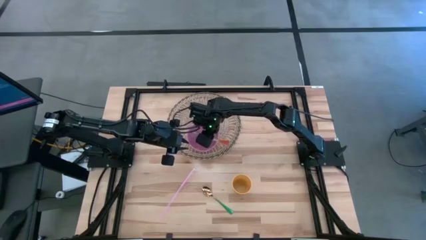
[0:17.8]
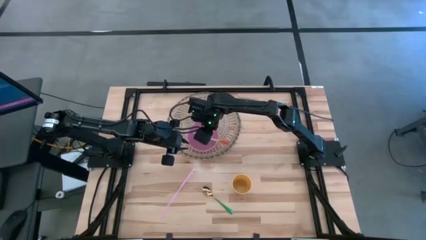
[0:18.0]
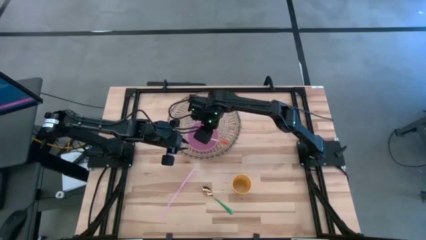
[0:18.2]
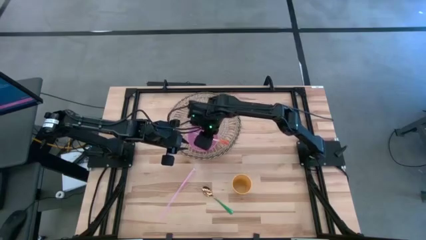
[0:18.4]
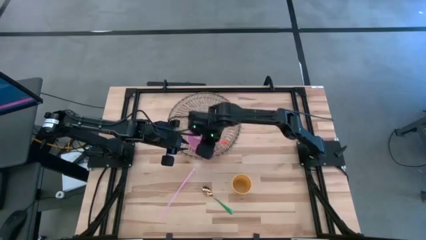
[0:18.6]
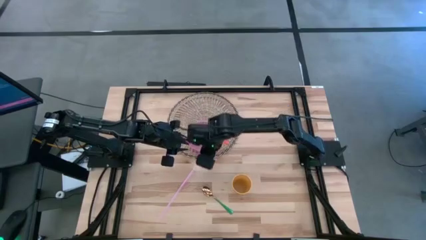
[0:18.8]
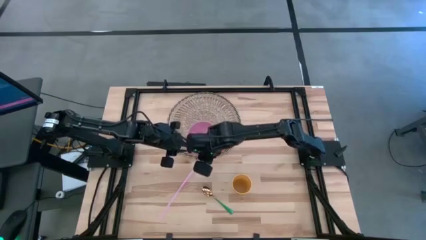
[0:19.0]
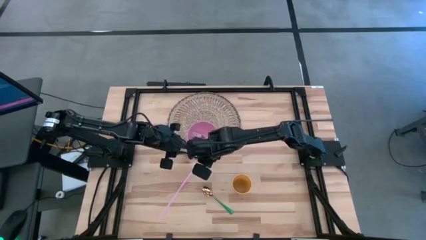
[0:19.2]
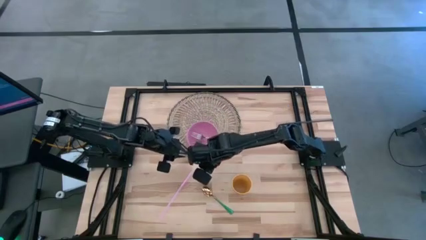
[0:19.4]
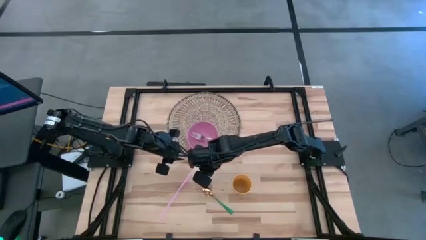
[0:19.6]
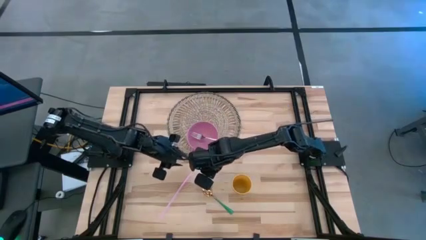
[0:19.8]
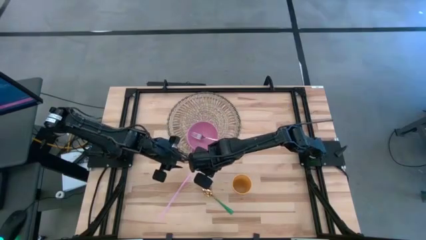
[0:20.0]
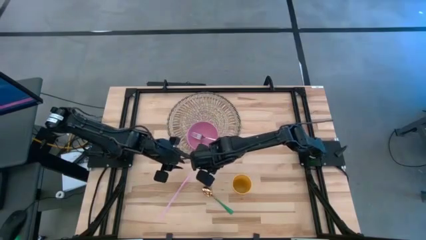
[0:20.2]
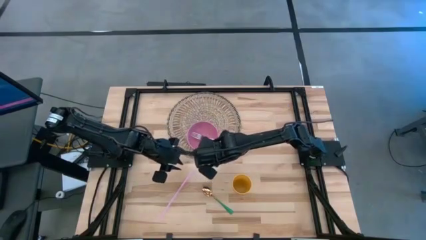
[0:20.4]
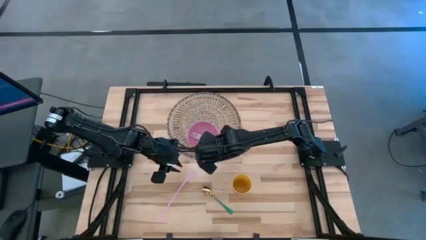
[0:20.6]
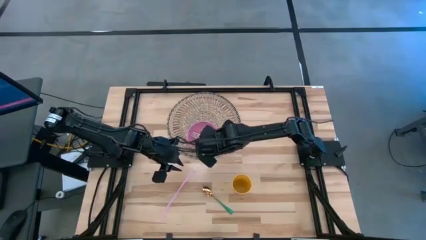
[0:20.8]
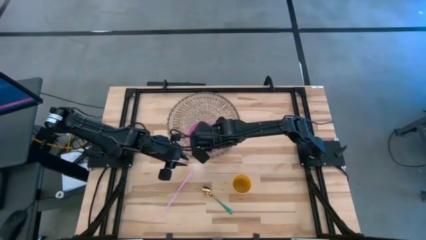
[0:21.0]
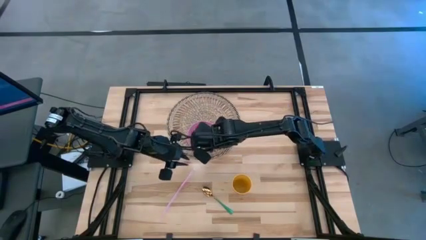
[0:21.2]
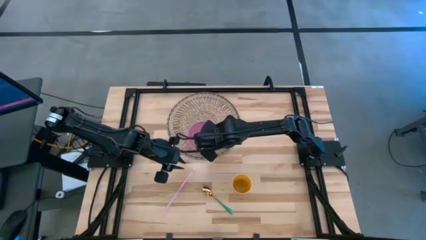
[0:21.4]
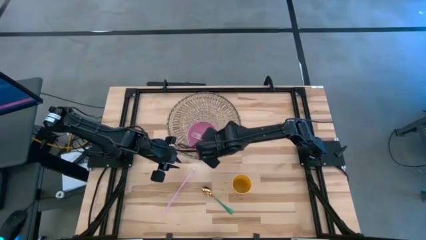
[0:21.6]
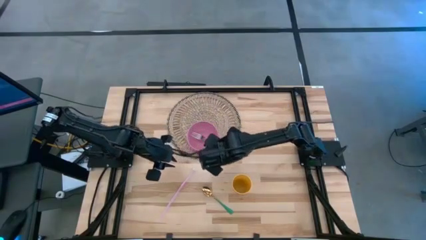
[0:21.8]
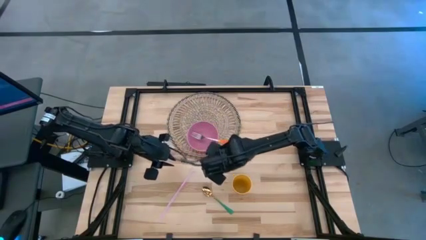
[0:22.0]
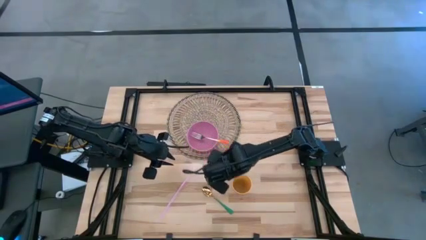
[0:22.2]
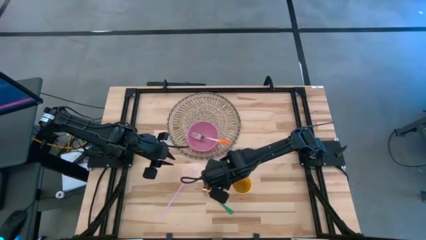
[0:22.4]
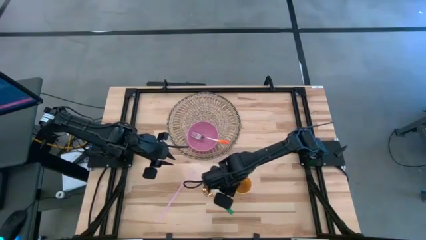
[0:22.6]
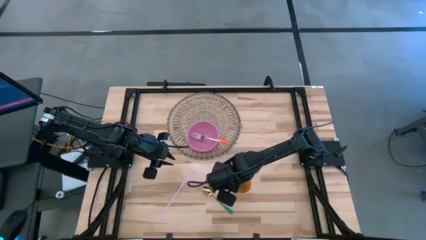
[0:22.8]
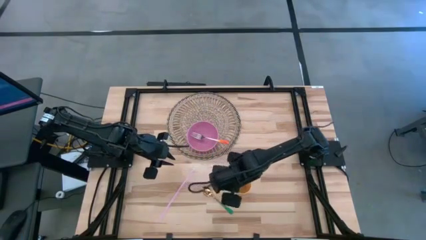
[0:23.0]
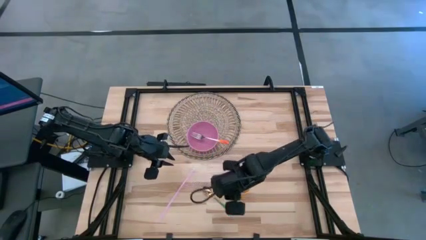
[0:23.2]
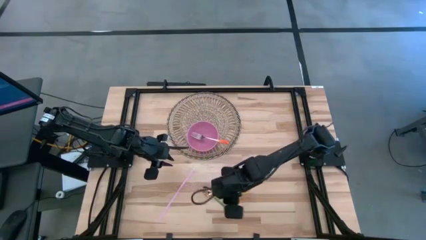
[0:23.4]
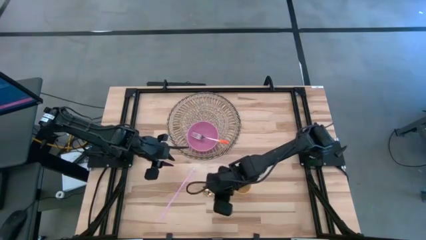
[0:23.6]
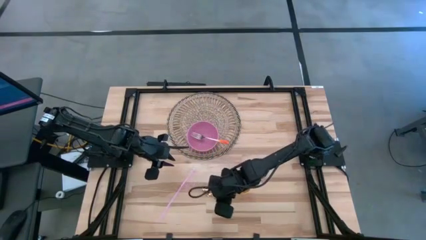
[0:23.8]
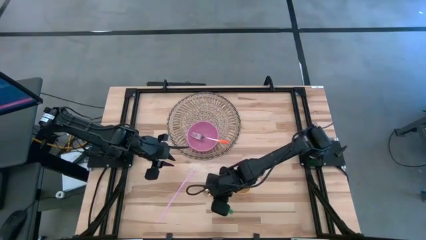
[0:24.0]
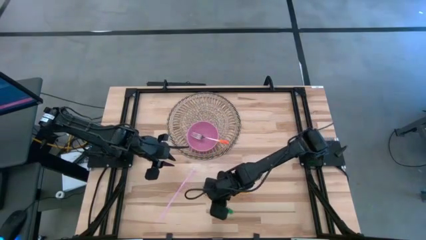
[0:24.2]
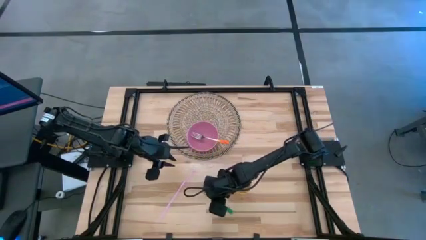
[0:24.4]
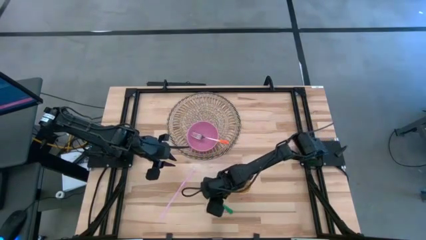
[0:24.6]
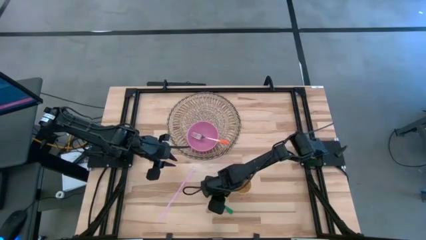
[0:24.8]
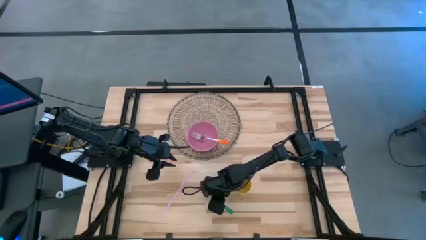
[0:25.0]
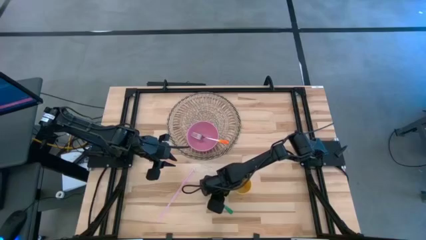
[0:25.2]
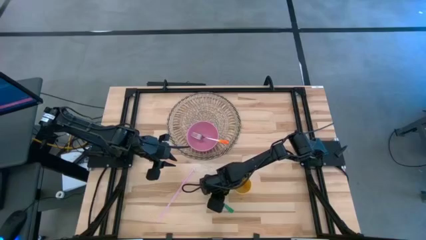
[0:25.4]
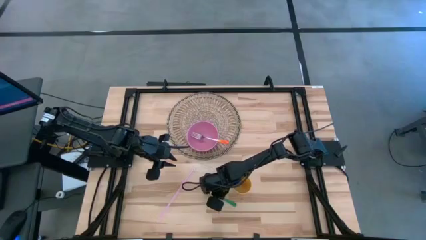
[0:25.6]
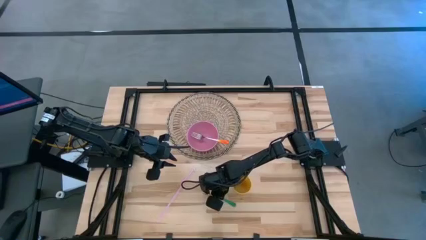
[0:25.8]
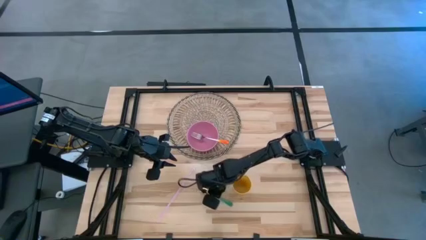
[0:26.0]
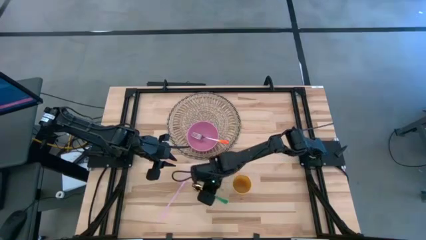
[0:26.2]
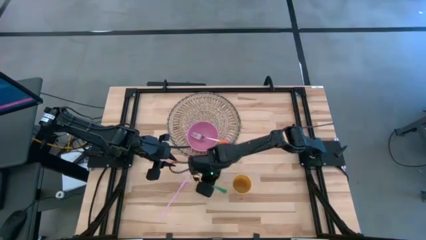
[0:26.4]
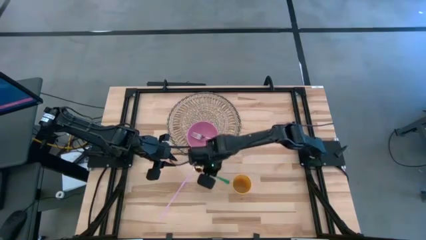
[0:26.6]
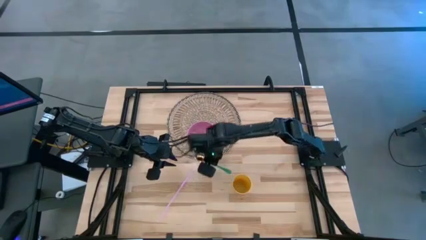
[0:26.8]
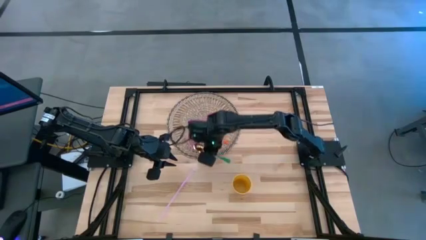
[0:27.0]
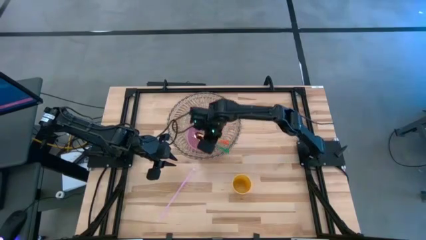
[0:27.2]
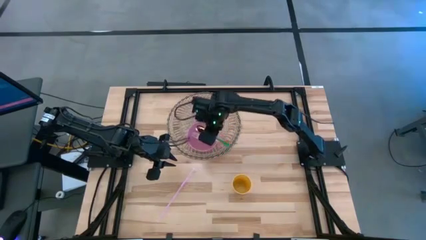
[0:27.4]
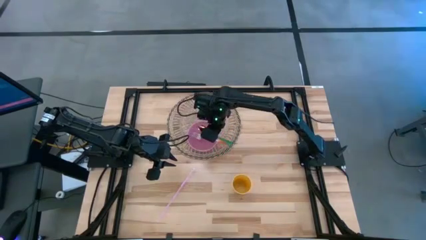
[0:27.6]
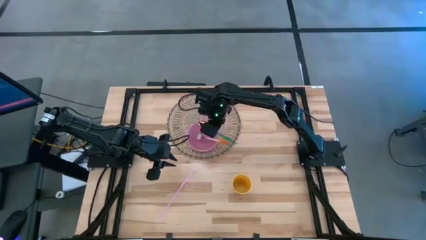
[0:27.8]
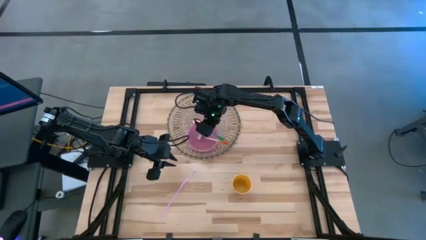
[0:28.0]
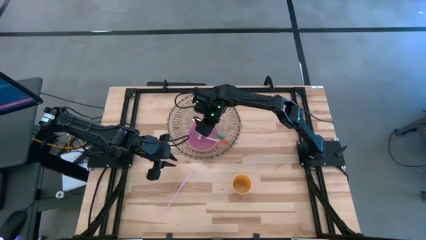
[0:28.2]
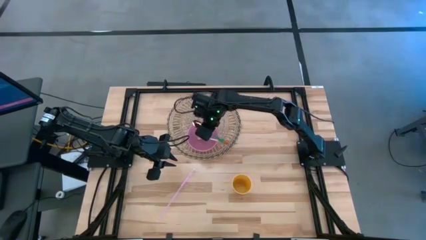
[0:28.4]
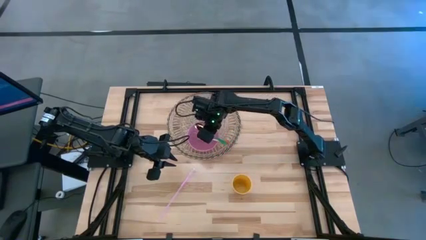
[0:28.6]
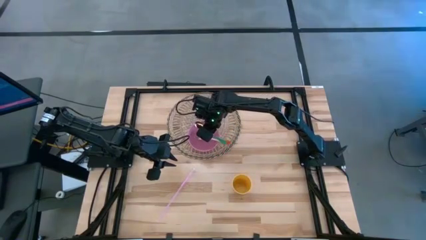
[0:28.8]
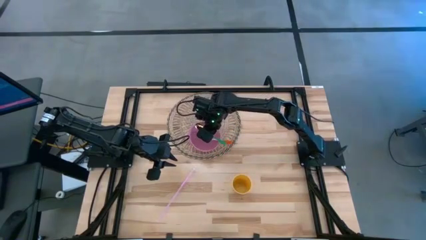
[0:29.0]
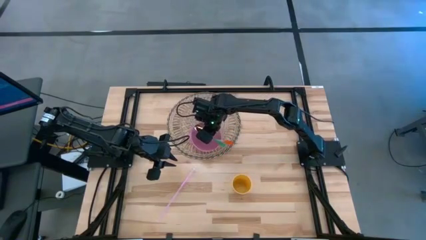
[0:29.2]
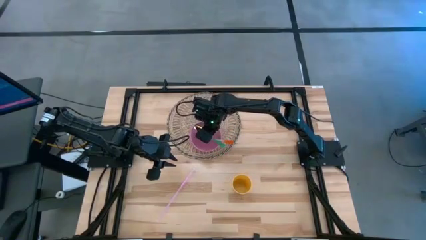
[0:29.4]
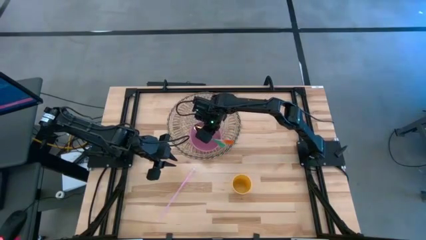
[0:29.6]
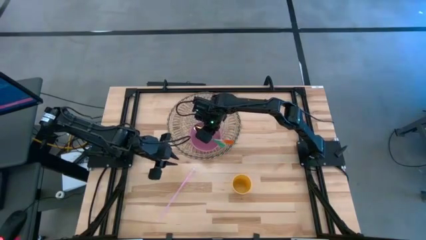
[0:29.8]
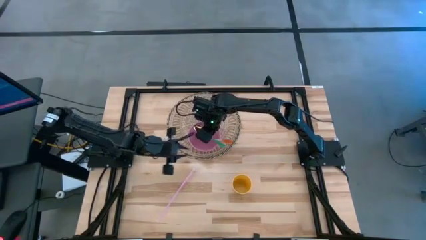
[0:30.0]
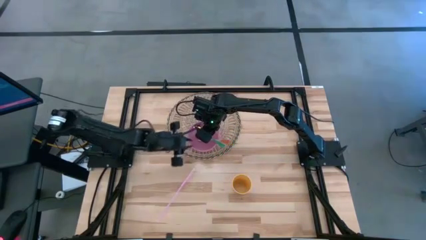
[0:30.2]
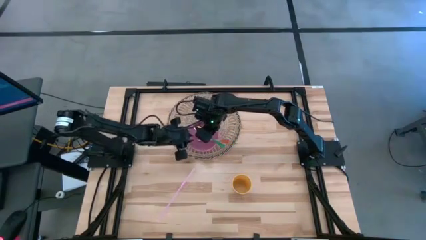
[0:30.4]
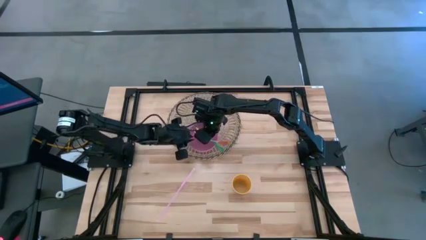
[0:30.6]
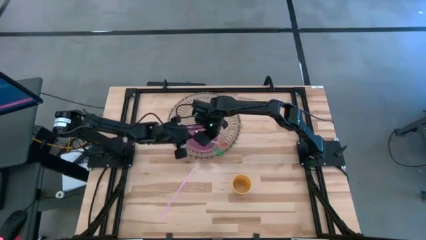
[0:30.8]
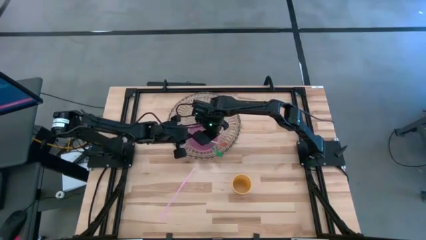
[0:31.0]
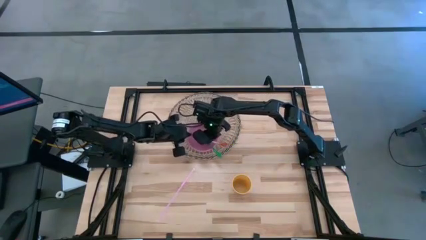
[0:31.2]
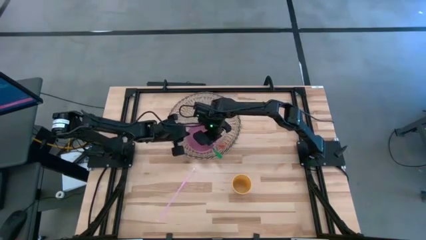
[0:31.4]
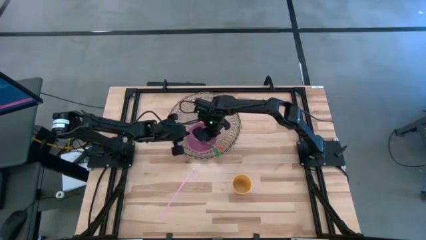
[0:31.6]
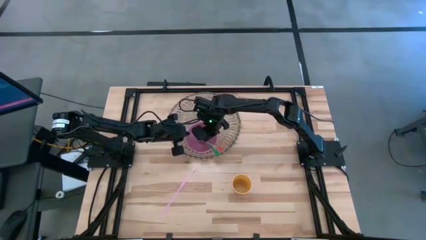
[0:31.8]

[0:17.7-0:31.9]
Task: Pick & Place Utensil
Put the green spoon into the pink bowl
